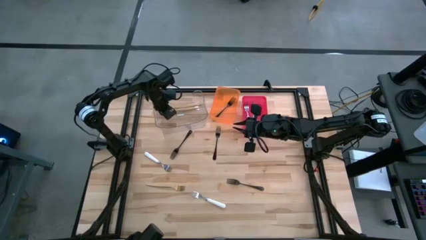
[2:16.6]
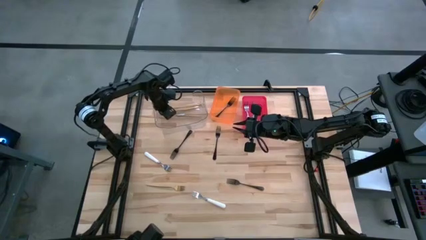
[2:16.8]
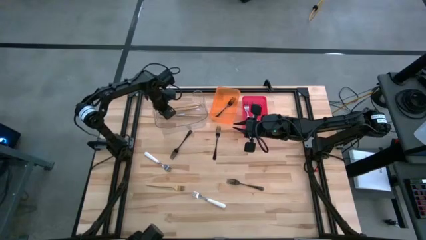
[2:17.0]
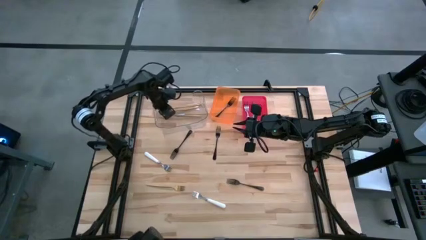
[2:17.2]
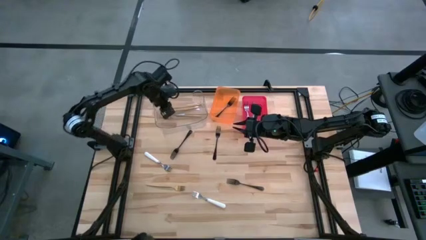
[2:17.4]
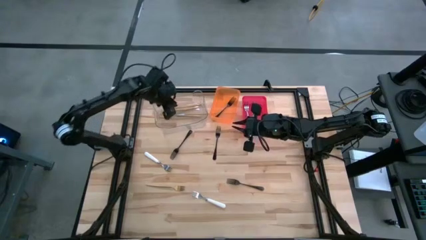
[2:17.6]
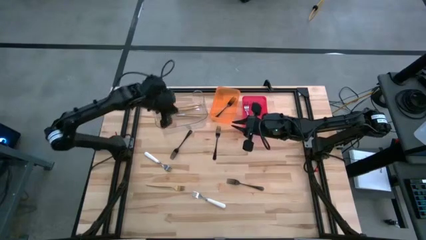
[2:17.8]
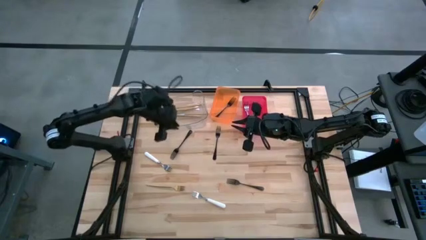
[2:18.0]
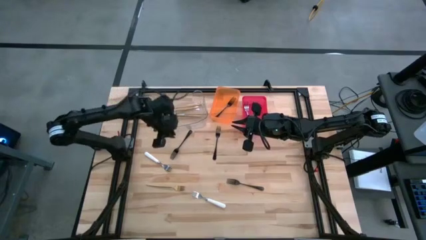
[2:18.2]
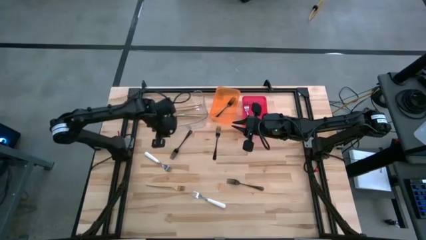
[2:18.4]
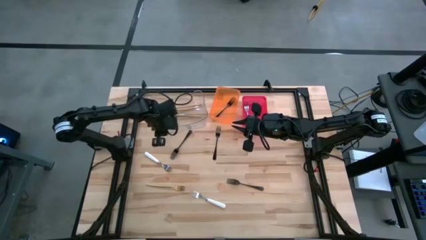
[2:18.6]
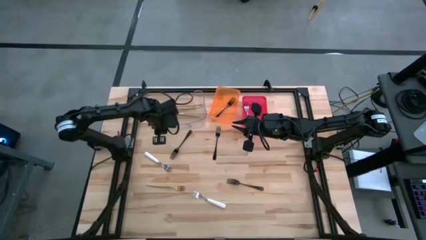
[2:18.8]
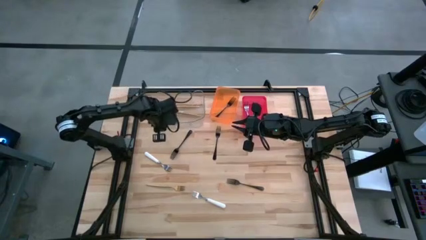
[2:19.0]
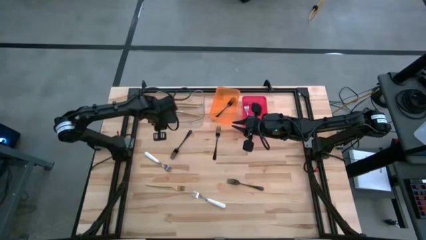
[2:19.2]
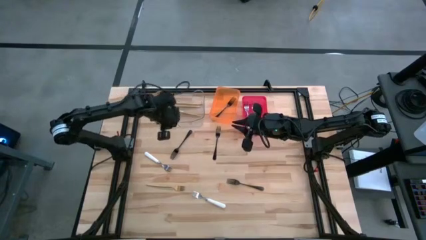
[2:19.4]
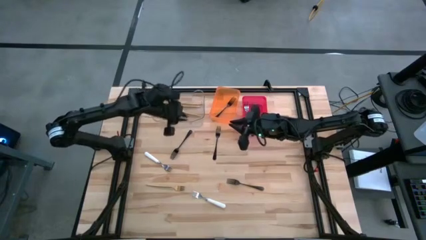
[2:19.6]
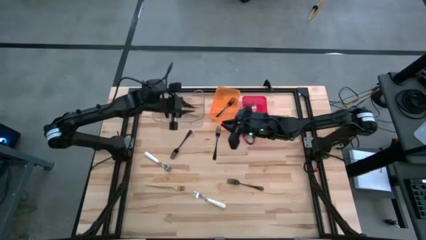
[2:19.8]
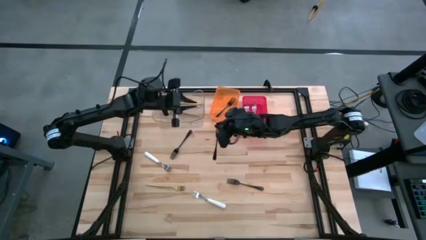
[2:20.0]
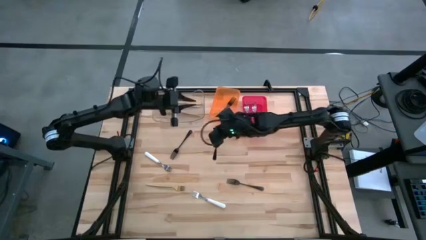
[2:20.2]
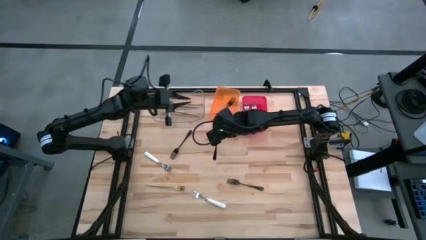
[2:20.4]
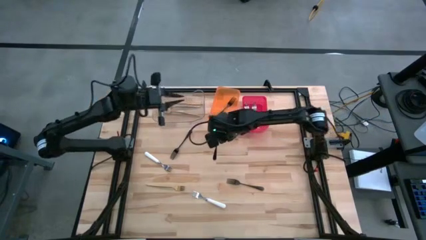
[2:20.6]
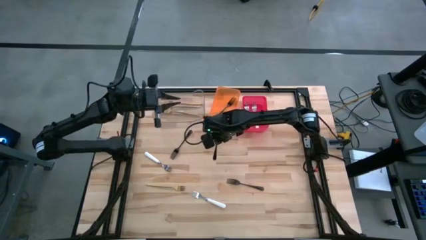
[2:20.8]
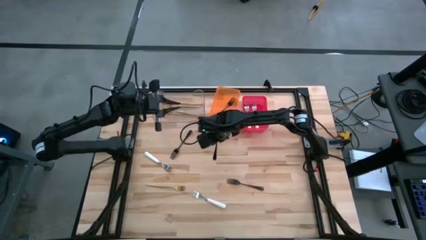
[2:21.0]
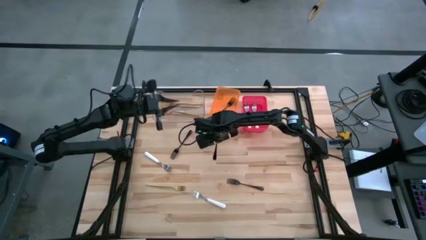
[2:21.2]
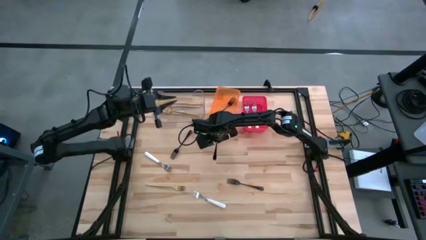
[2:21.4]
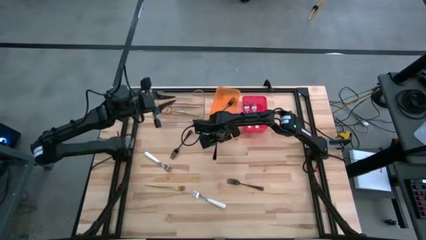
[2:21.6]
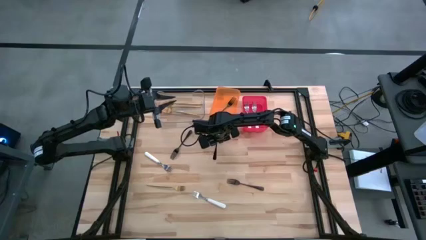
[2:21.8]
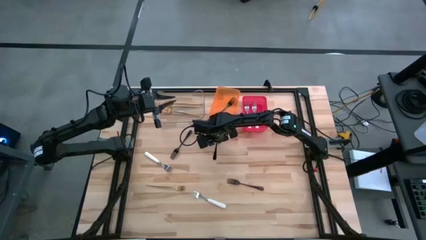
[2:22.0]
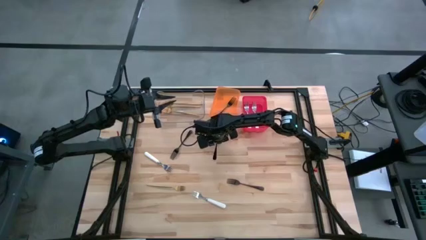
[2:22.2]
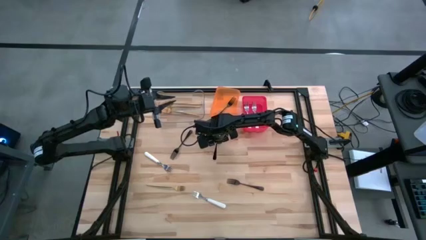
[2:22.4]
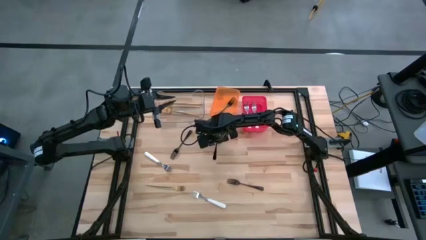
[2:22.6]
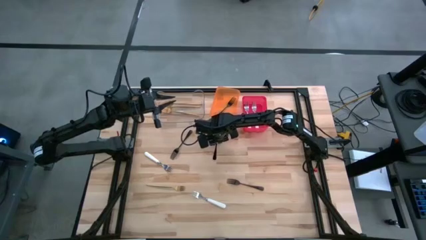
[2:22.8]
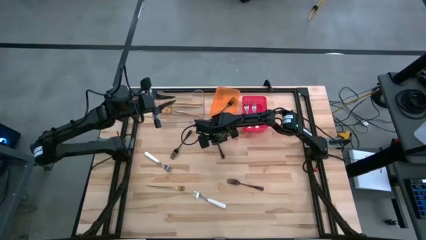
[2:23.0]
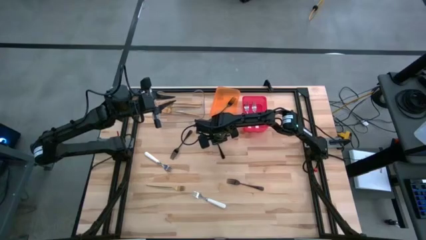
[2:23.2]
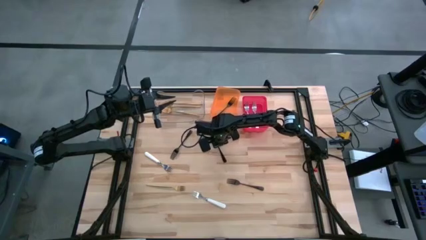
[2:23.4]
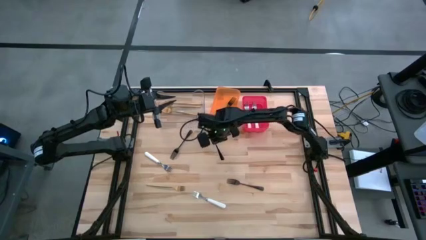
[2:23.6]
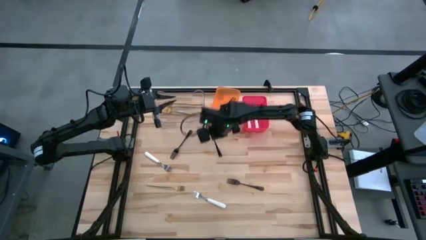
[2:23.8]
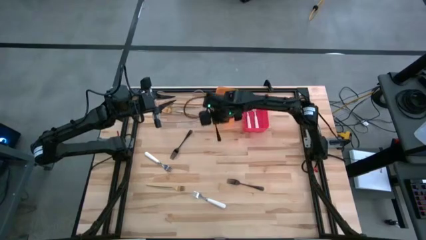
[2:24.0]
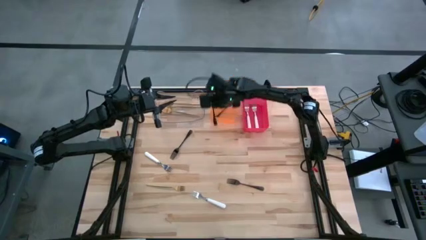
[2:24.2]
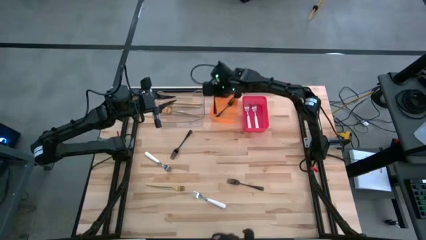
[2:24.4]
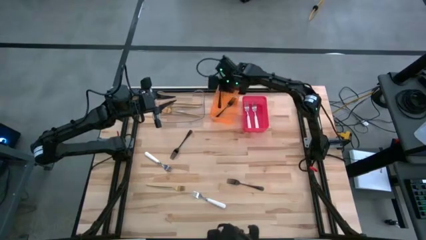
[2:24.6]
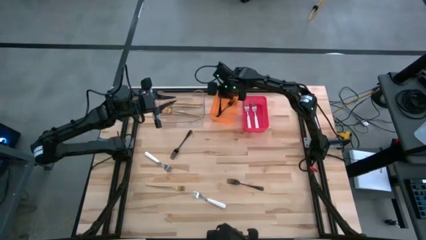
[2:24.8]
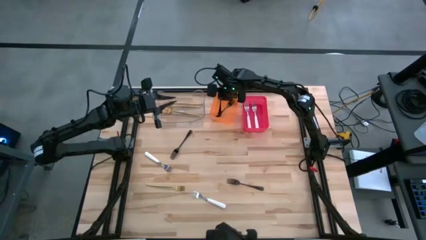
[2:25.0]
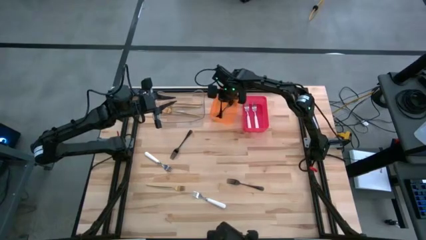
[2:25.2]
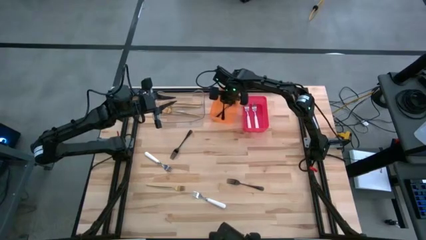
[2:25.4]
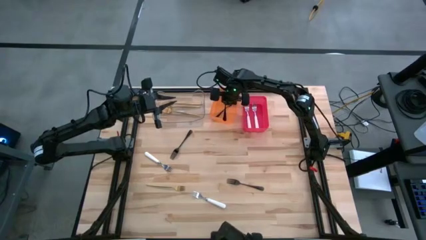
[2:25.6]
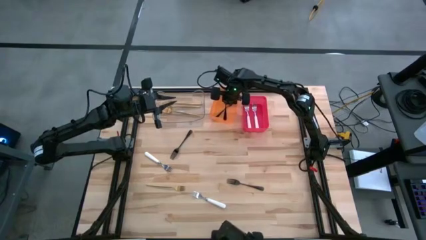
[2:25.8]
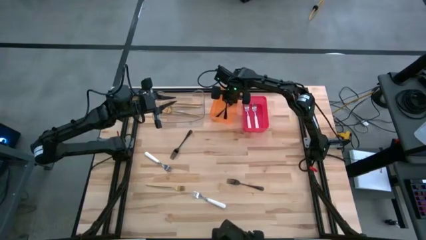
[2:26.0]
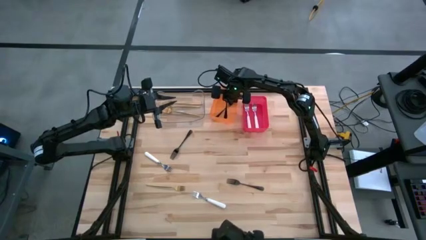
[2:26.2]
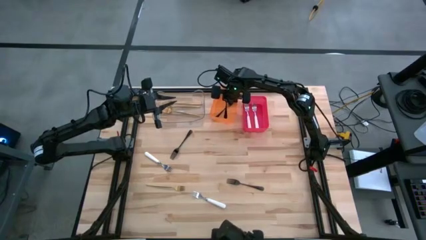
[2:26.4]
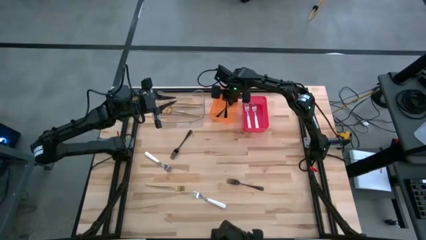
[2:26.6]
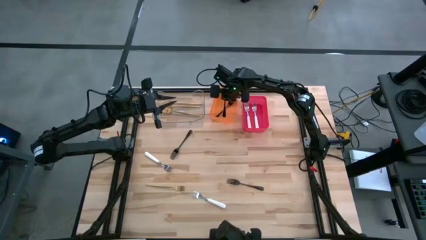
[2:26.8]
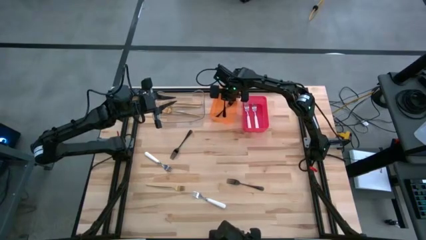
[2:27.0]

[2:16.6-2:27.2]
Task: Sort silverware by color (type)
Put the black fork into the orange bin
